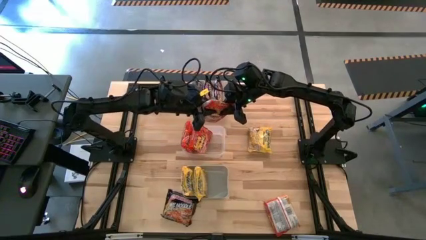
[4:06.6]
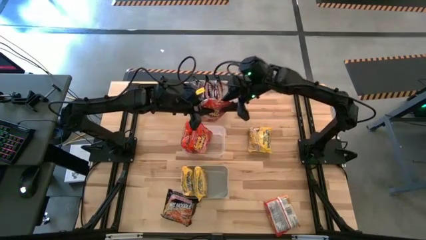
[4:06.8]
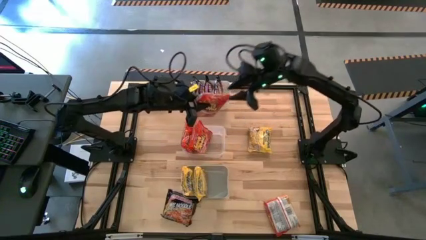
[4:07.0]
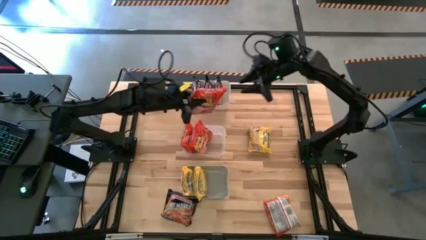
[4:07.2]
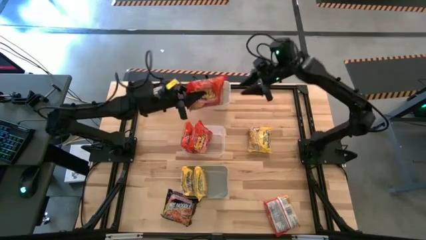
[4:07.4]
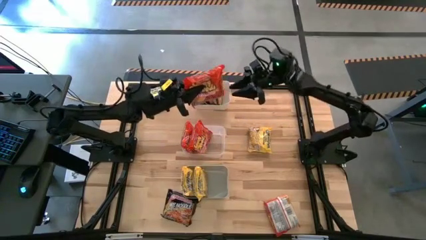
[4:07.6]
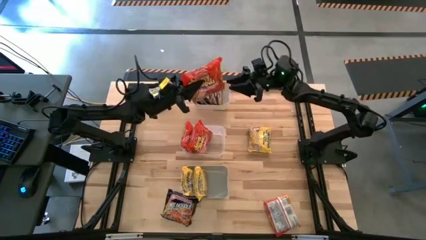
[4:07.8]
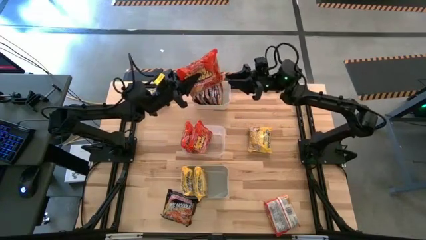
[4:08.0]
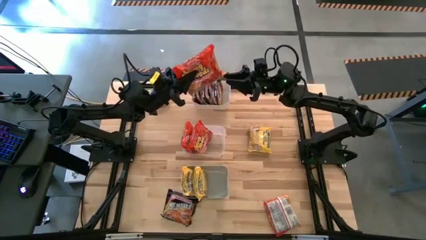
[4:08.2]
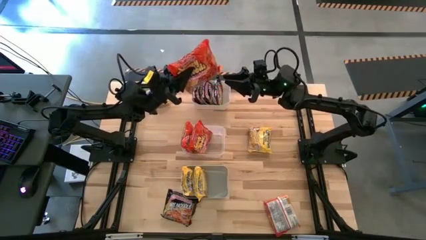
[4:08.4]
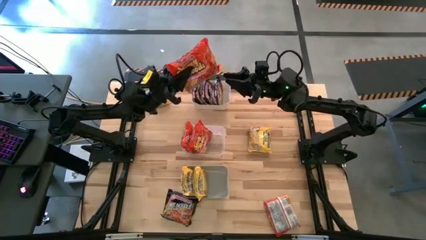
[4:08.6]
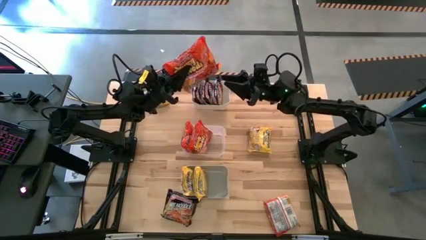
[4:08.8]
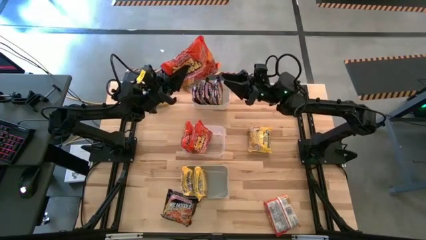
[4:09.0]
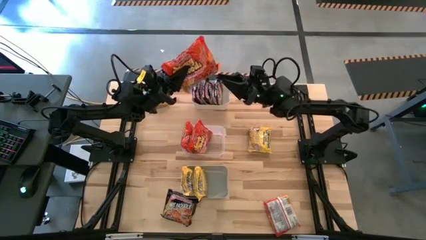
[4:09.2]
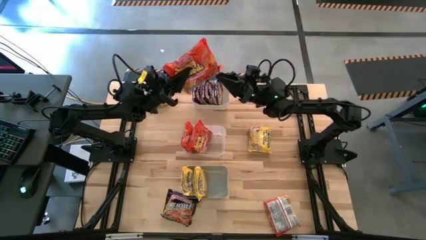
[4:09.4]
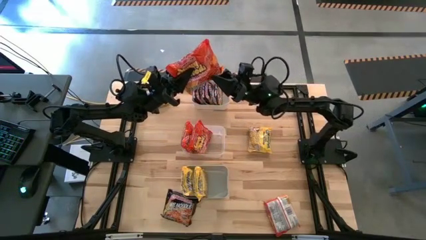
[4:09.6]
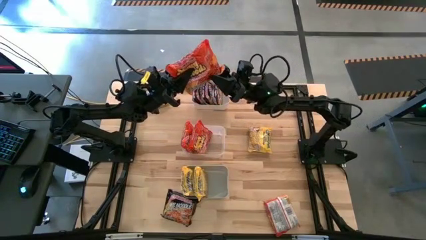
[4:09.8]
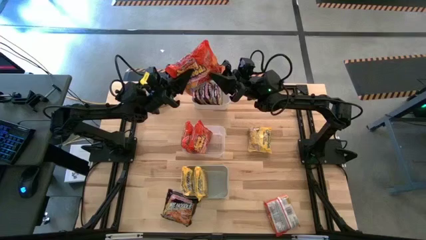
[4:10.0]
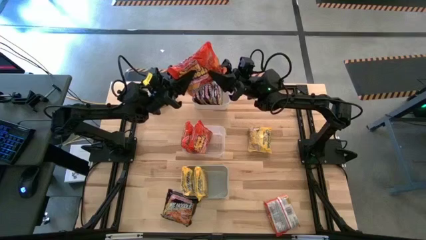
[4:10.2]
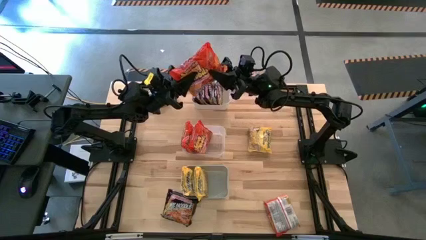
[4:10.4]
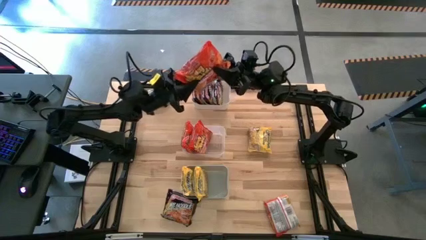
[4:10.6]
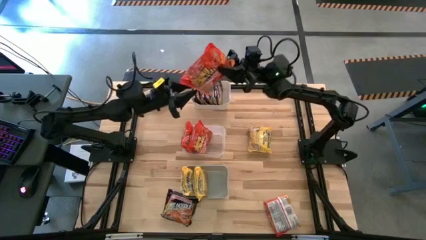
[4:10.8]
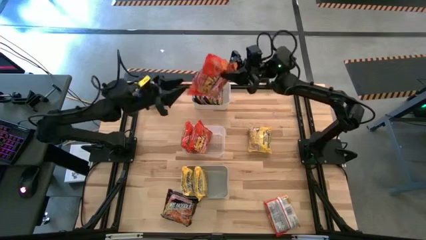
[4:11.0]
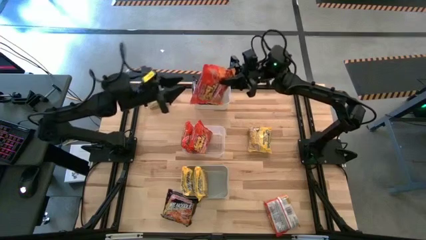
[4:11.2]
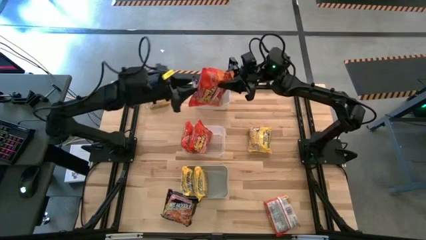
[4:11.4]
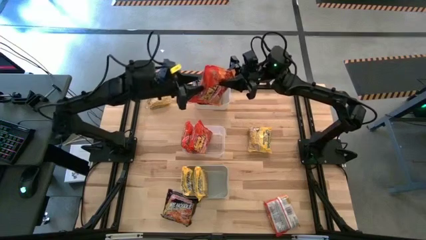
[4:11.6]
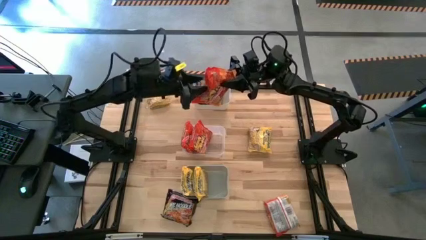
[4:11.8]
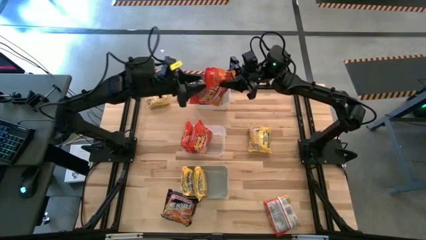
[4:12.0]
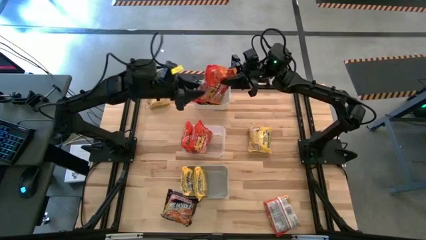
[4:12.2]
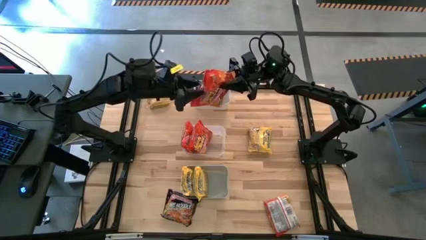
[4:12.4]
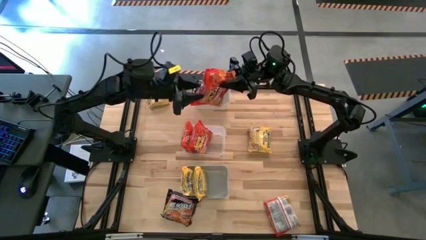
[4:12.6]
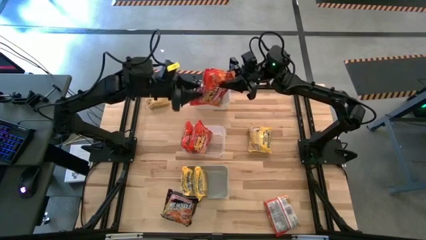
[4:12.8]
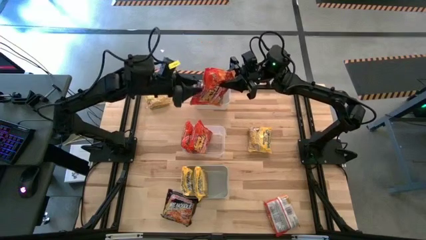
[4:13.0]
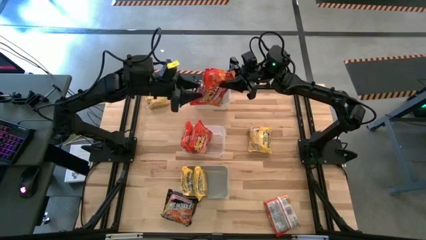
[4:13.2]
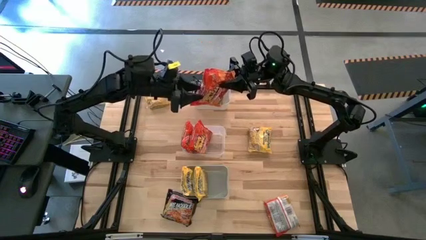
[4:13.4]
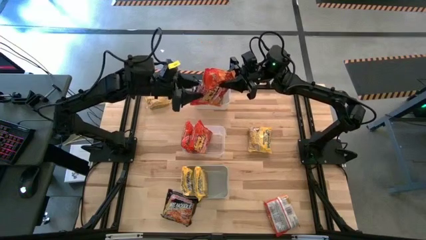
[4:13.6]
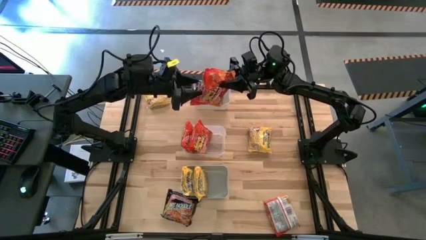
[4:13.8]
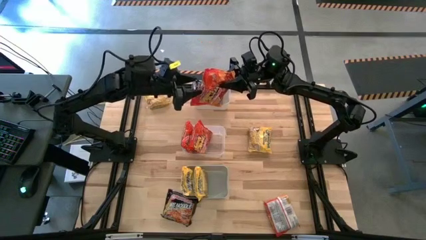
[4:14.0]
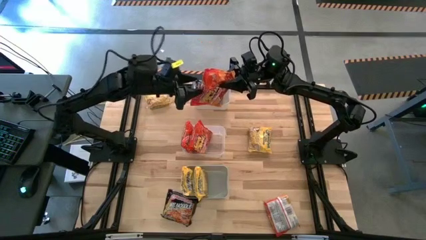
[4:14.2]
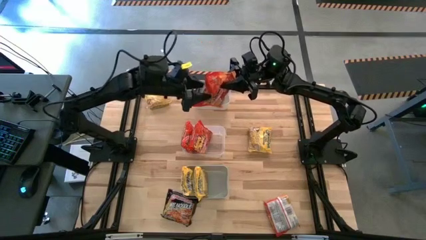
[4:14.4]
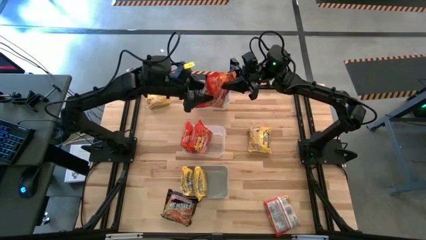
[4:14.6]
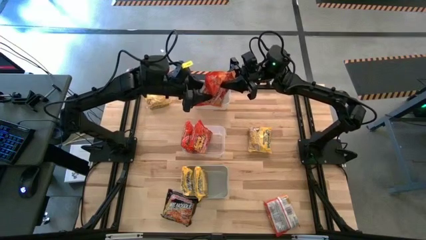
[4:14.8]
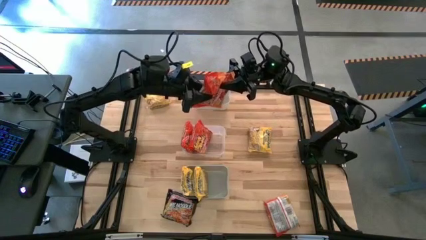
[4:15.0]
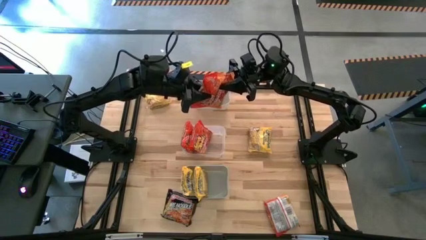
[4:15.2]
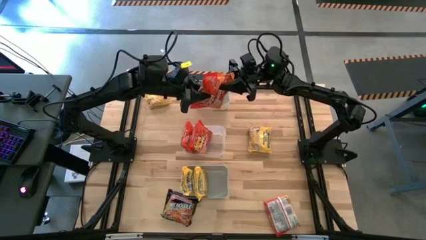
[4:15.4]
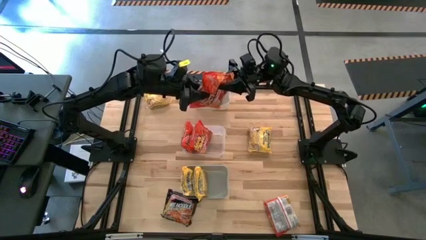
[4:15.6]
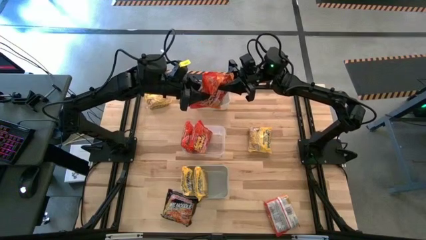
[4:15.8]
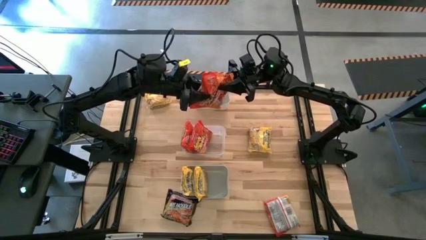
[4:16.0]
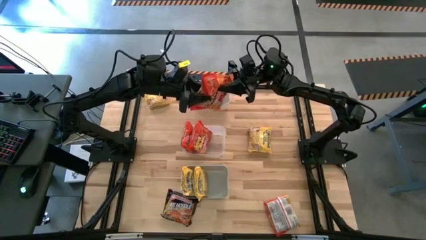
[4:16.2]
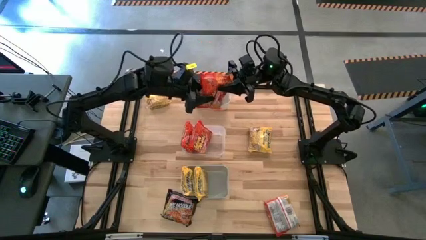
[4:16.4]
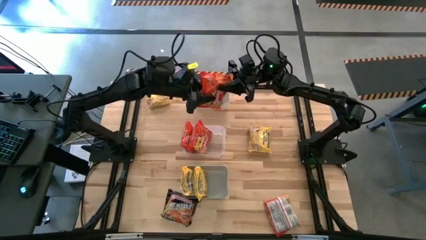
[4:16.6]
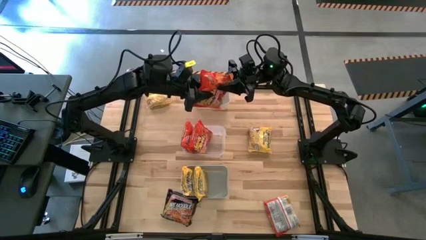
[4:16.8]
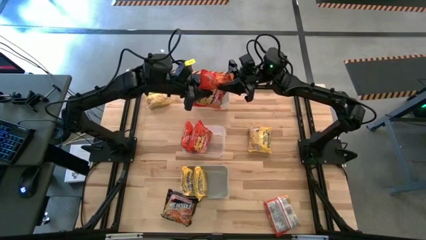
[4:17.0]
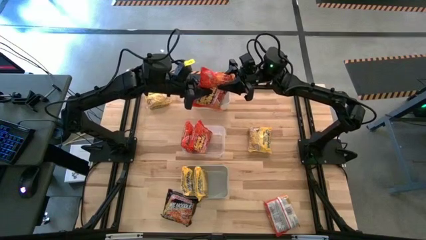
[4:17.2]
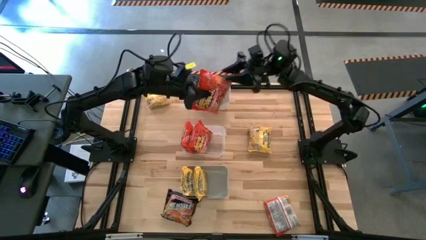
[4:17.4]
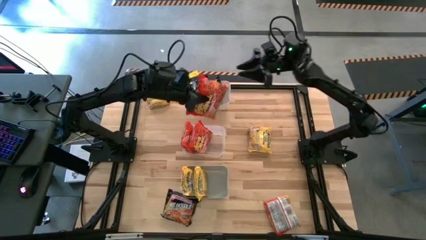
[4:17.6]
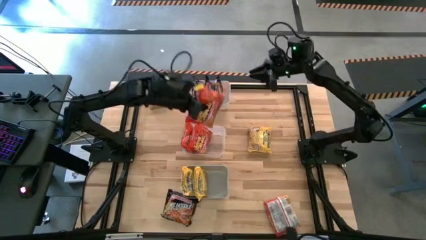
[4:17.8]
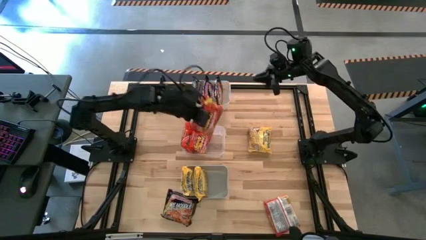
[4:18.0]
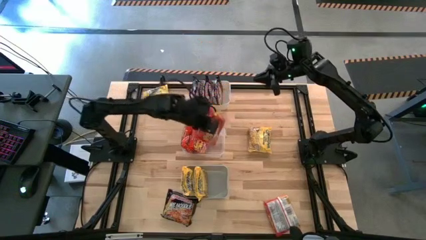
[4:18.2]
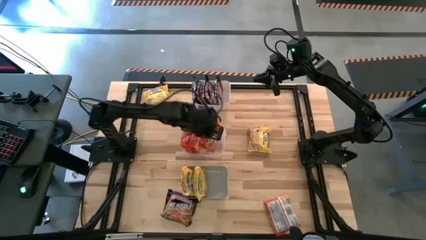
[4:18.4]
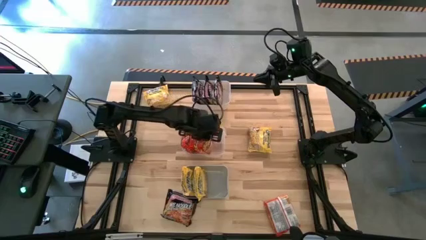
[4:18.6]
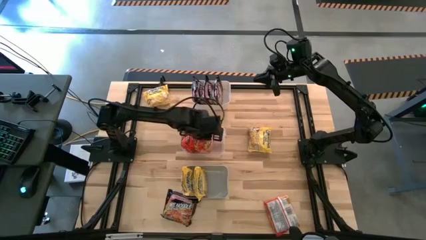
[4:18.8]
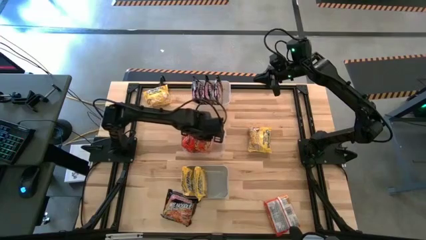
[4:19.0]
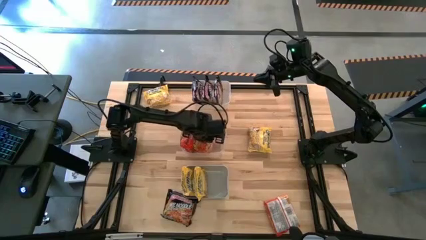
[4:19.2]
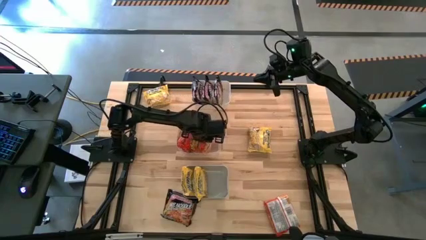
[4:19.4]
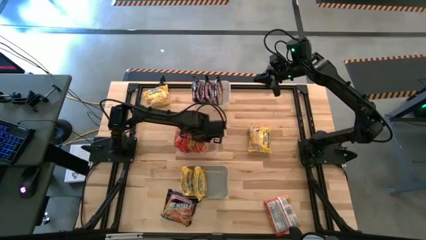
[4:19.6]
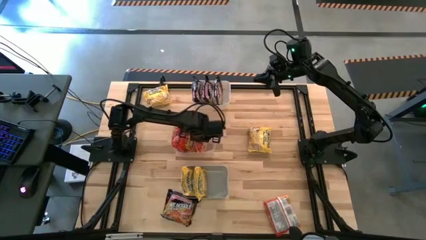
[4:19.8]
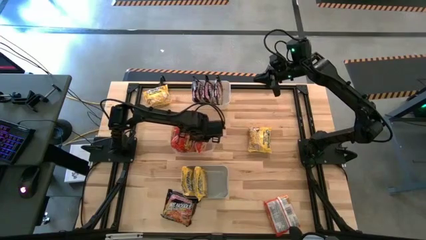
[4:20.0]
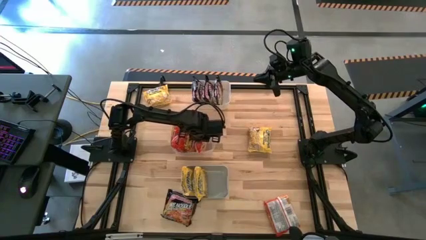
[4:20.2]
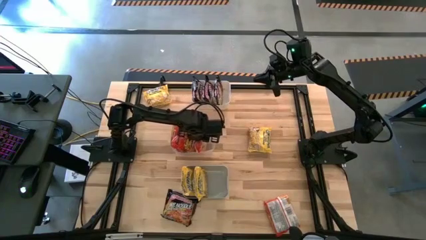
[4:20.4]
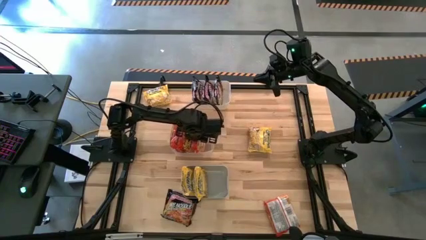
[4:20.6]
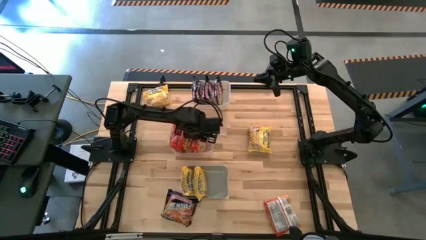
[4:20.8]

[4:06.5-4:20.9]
Task: Sort Maruchan noodles
Put the orange noodle pack into the transparent bin
